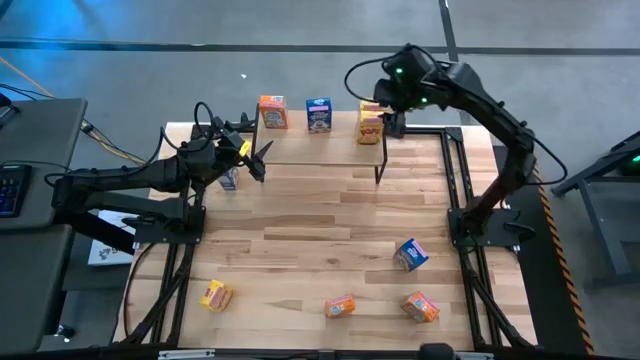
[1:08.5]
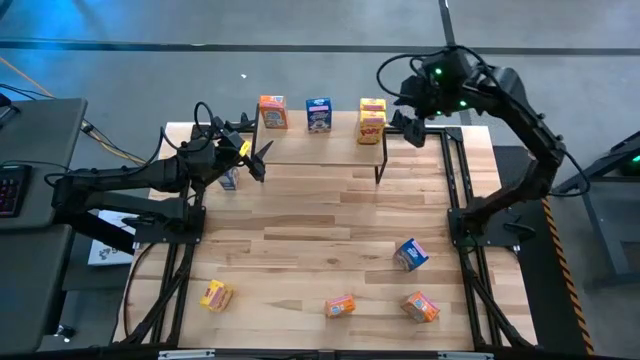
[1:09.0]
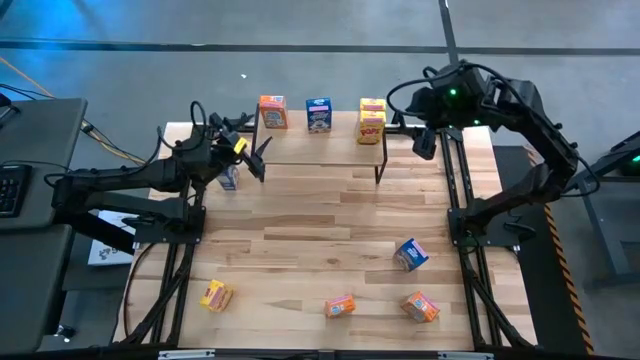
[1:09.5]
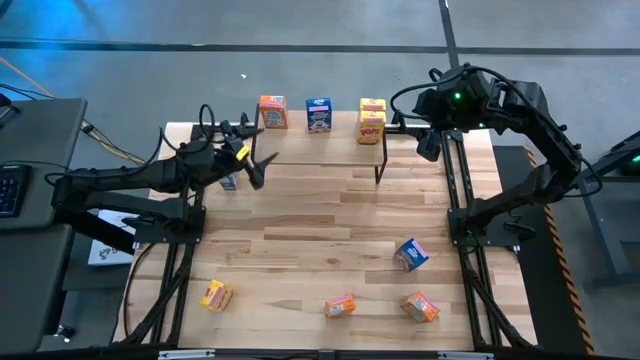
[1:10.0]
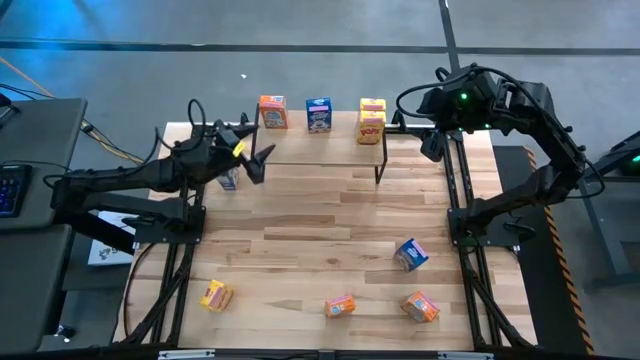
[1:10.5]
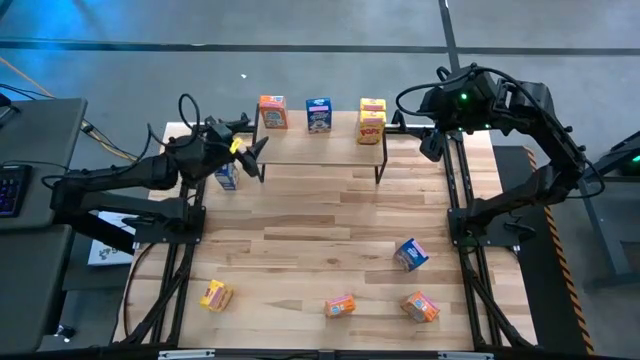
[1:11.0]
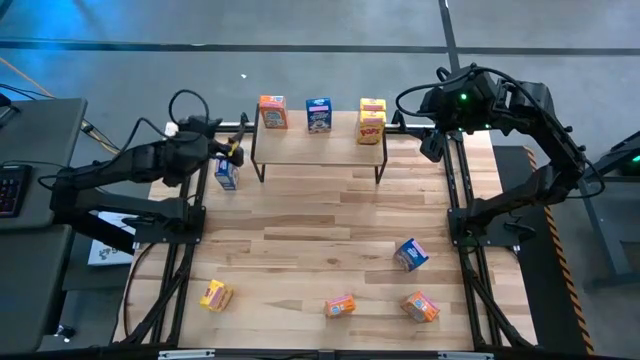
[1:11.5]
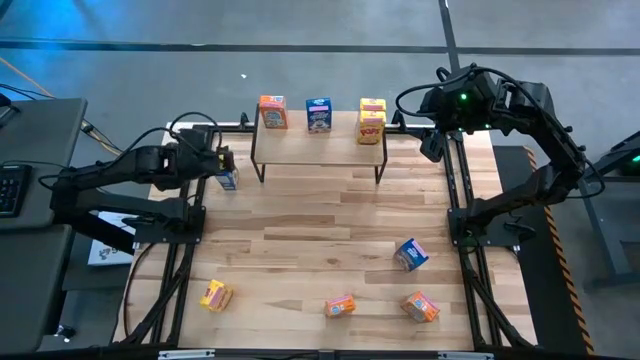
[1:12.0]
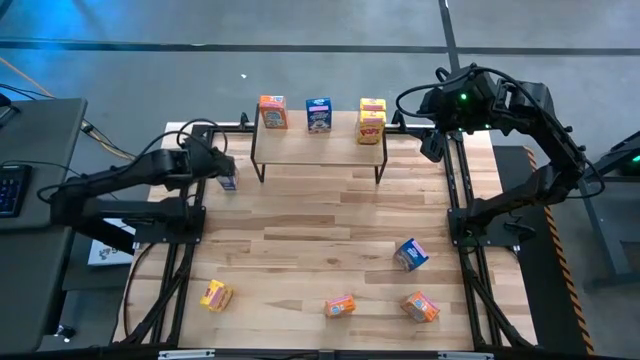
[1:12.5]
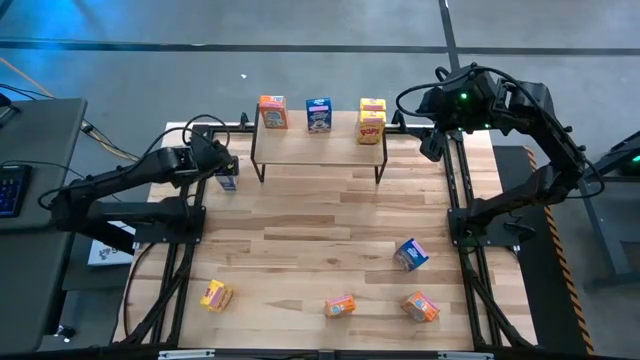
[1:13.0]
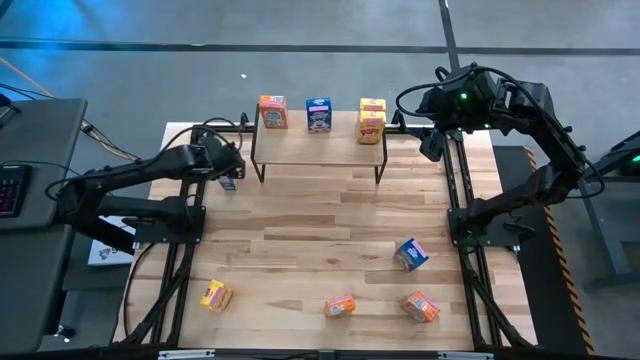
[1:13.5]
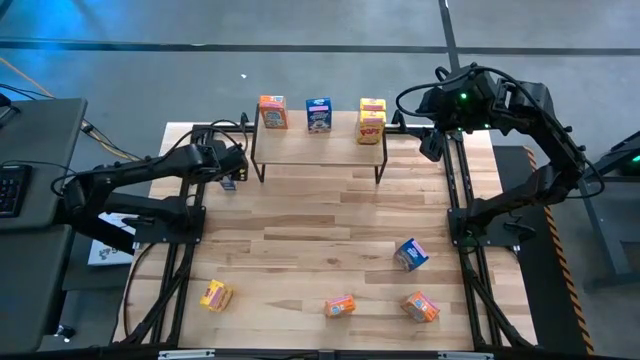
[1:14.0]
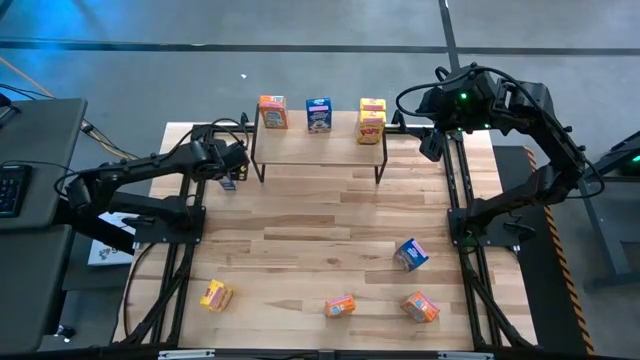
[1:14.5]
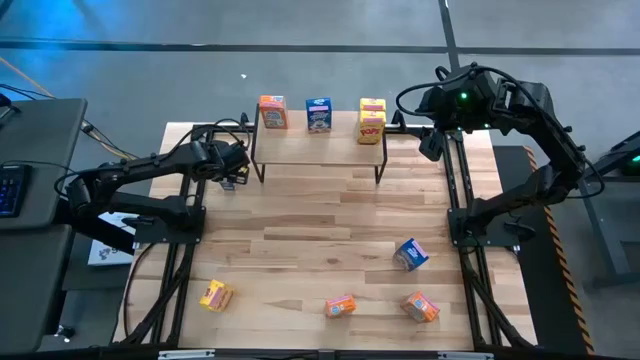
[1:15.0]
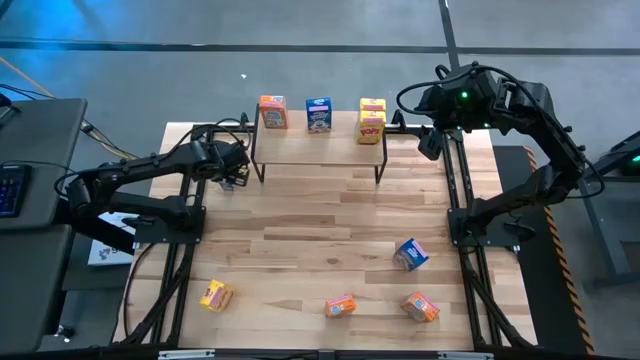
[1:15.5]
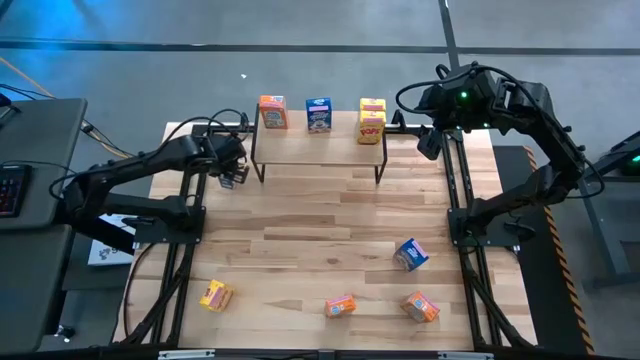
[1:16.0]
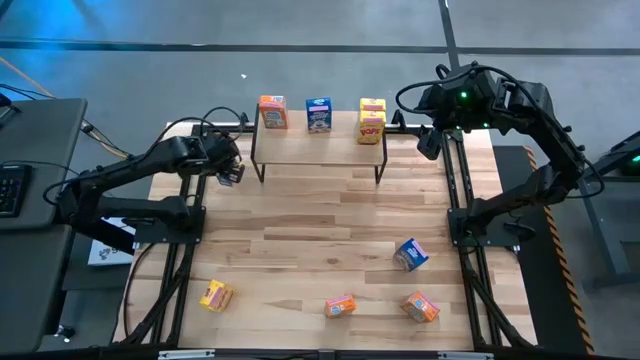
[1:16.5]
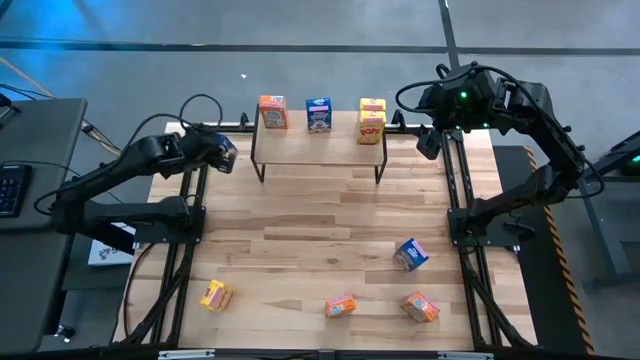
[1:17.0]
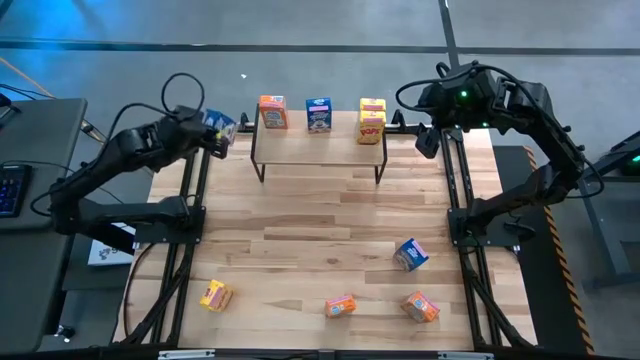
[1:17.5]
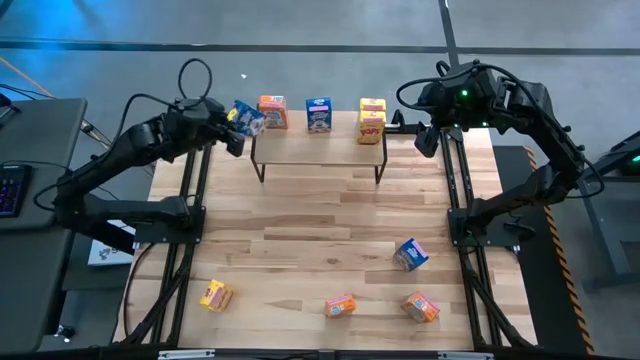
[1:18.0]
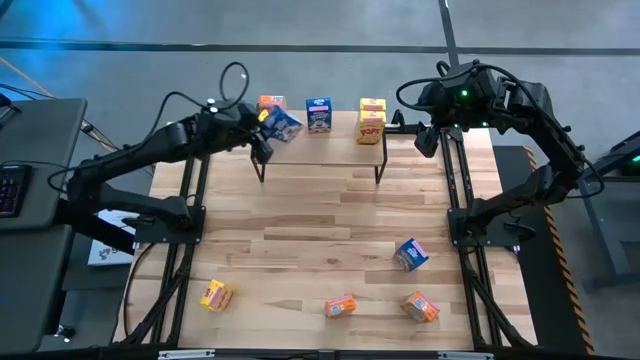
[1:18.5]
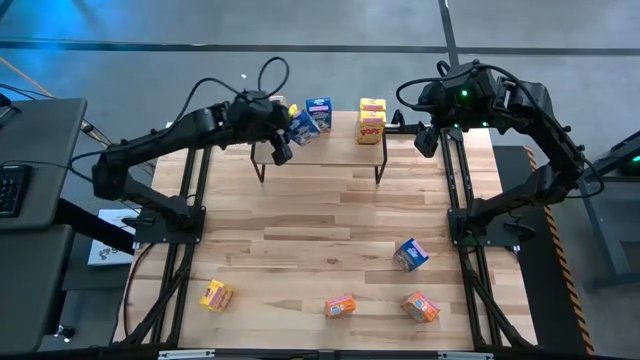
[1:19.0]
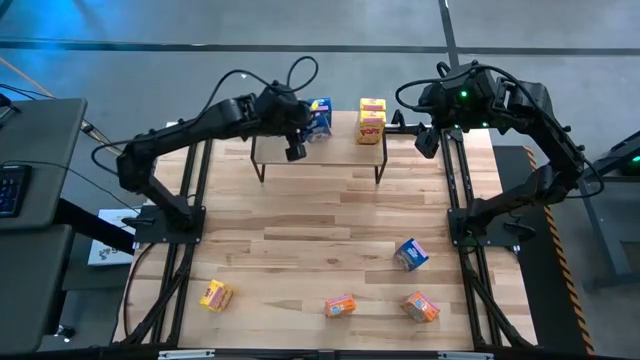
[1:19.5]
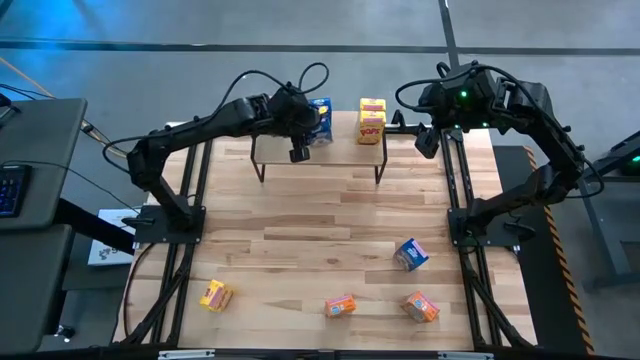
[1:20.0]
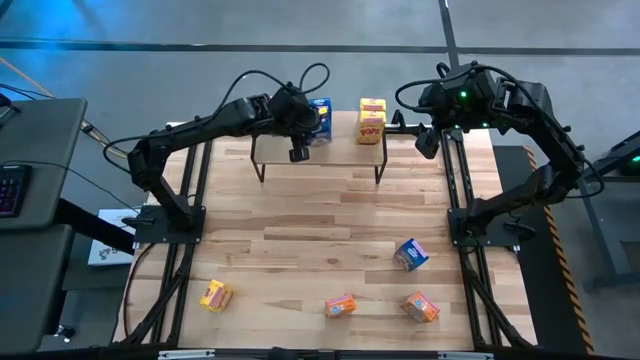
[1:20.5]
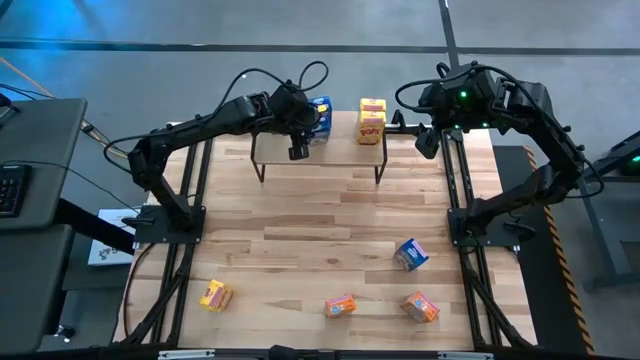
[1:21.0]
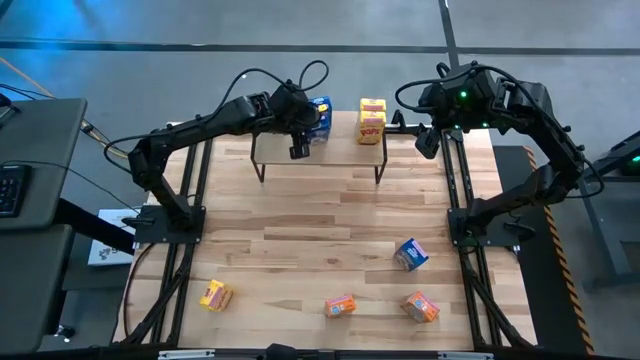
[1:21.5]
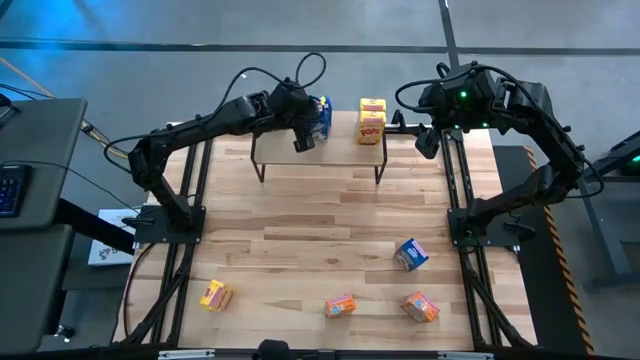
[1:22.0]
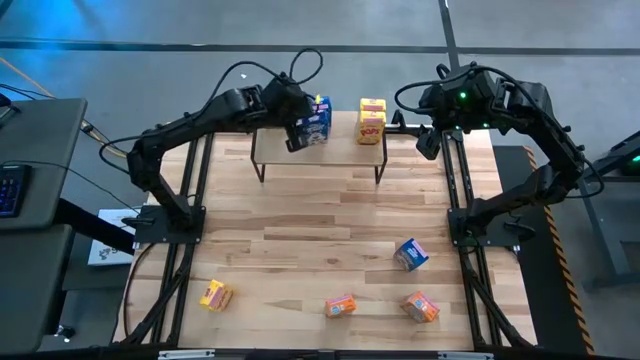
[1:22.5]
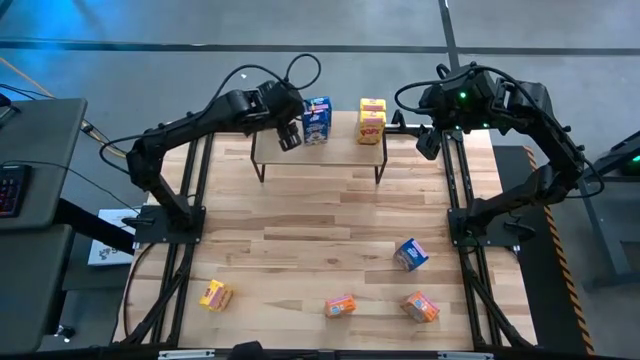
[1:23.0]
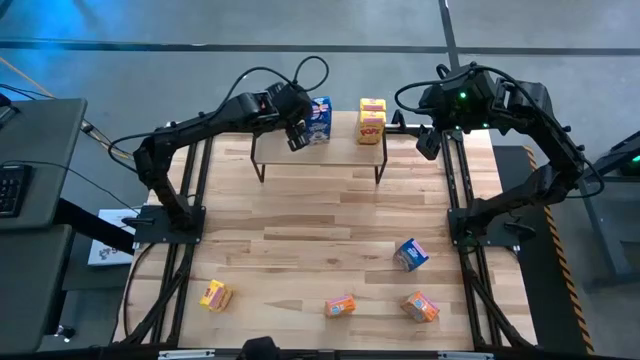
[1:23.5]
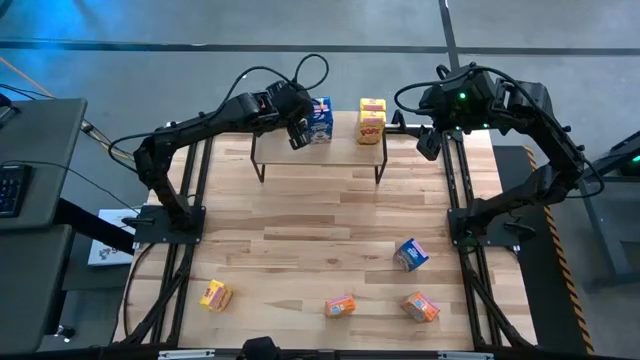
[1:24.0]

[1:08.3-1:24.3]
Task: Stack cereal on shelf
Put the top blue cereal box on the shelf aligned with the other blue cereal box

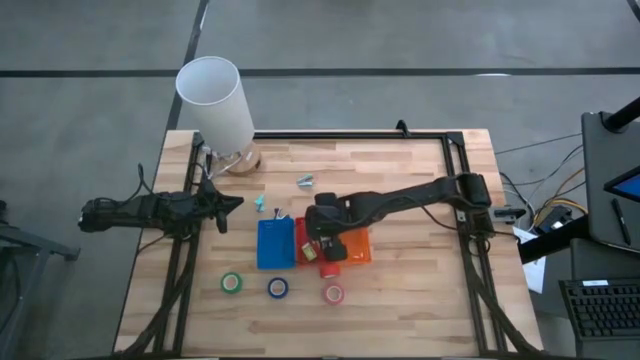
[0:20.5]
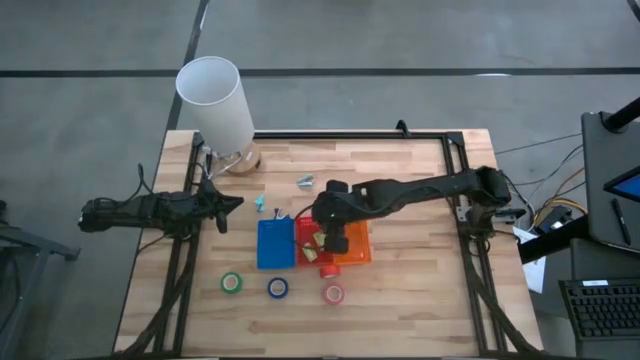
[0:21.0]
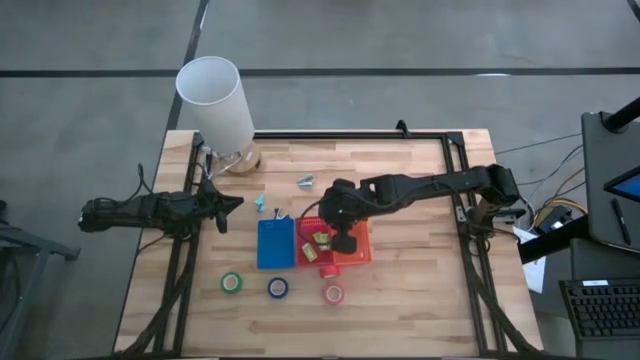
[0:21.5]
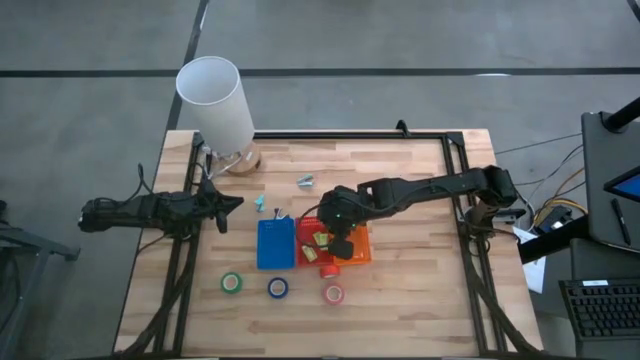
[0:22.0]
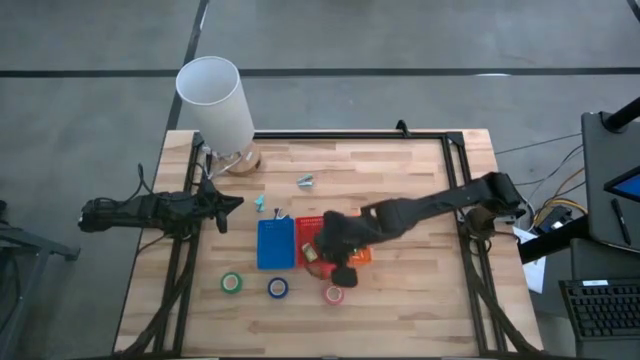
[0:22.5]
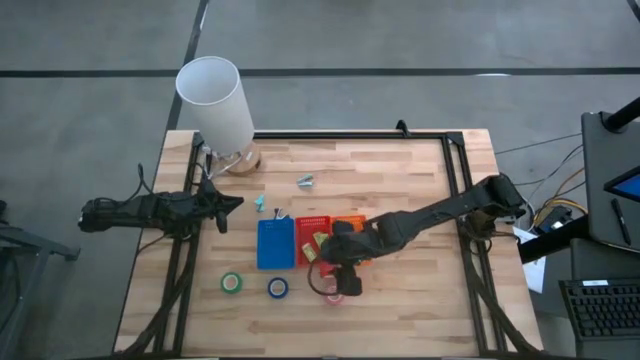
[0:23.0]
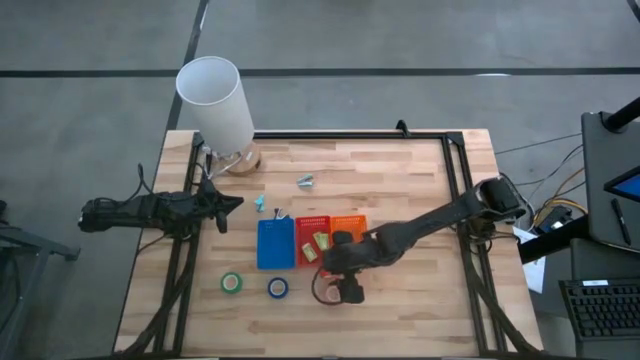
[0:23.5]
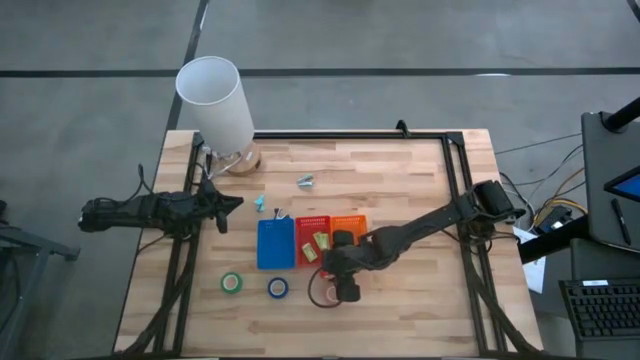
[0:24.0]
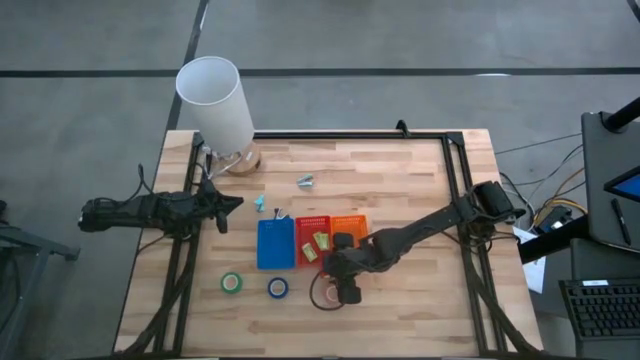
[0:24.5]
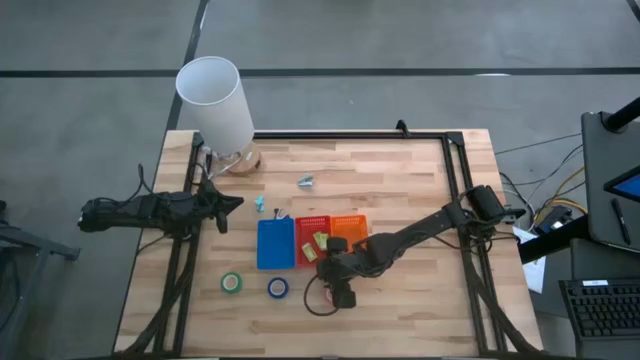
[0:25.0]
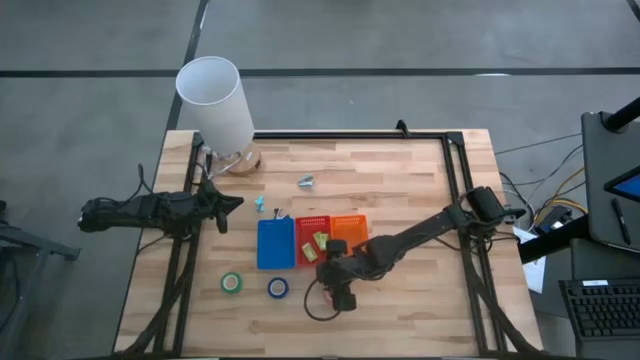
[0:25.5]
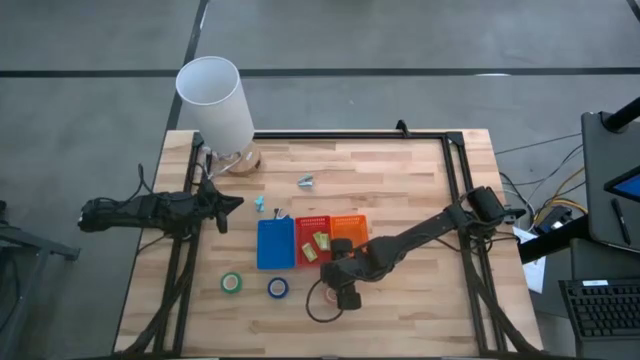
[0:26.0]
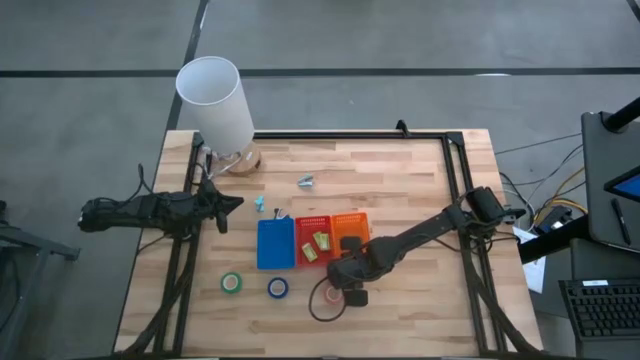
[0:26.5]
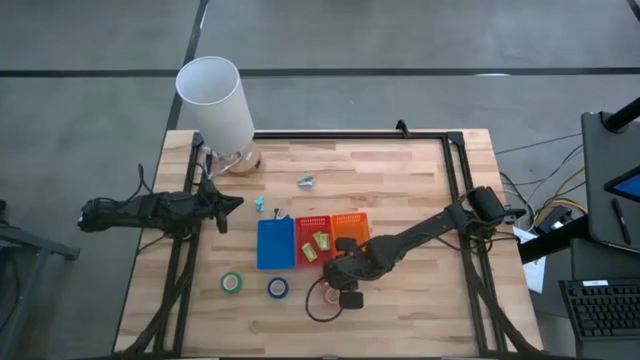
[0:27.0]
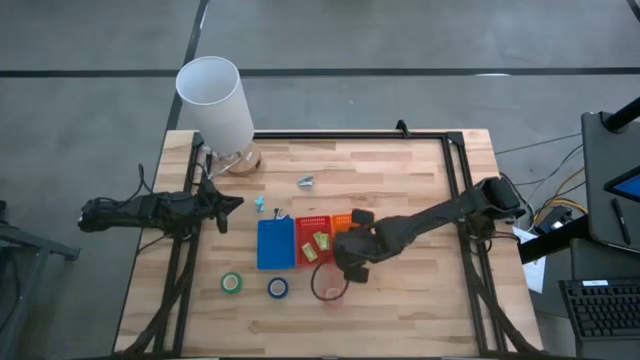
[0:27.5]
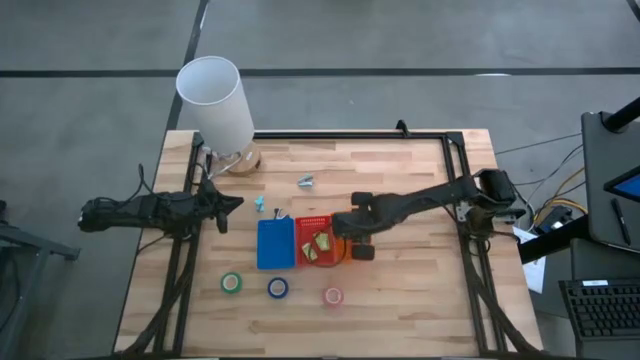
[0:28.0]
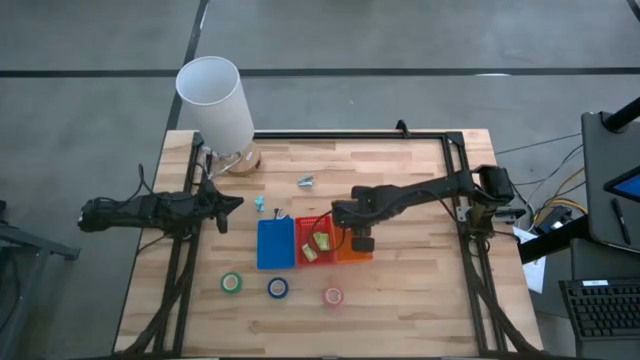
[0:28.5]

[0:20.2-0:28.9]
Task: Pick and place Stapler, Stapler remover, tape
Put the red tape into the orange bin
